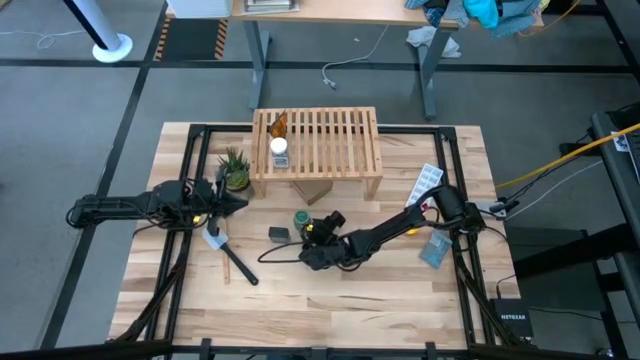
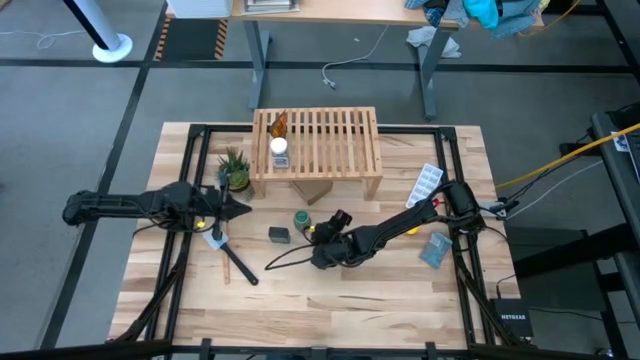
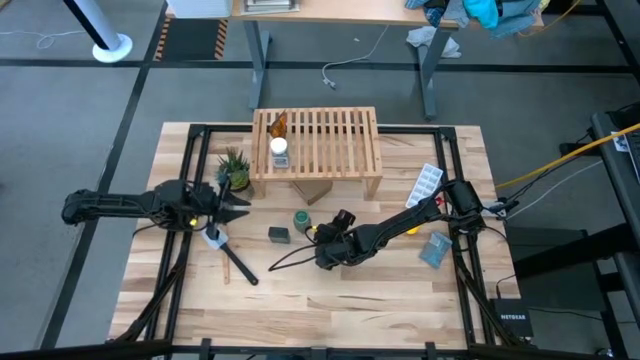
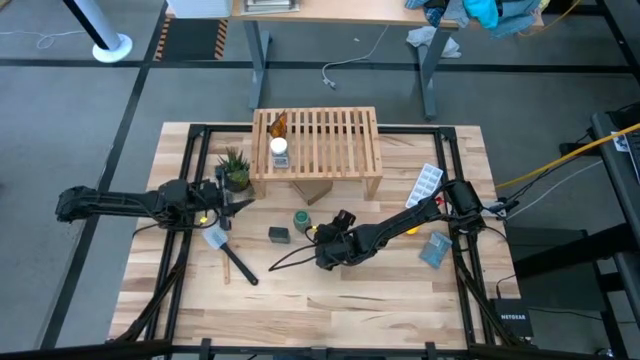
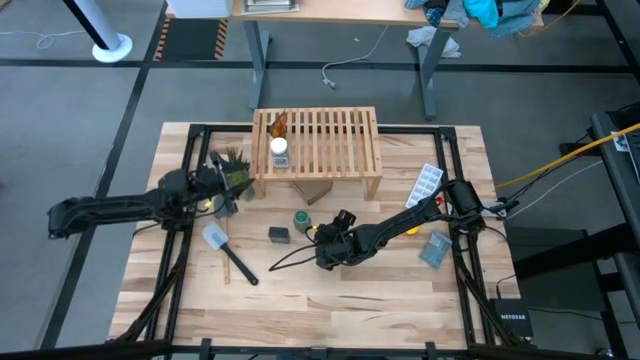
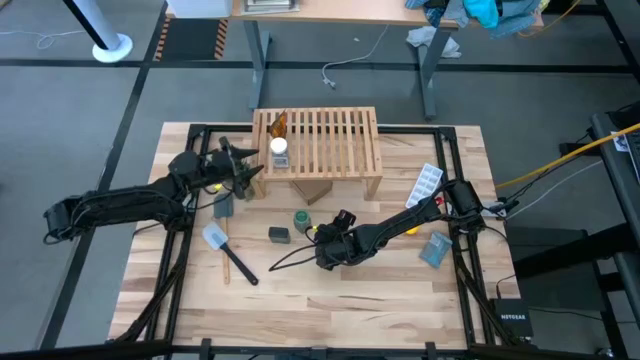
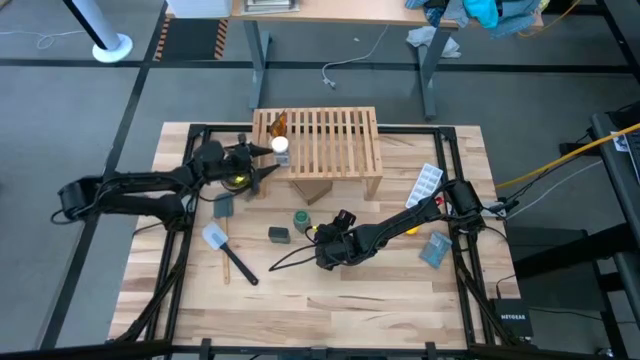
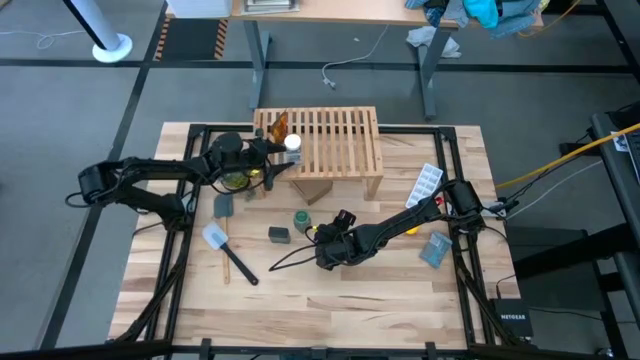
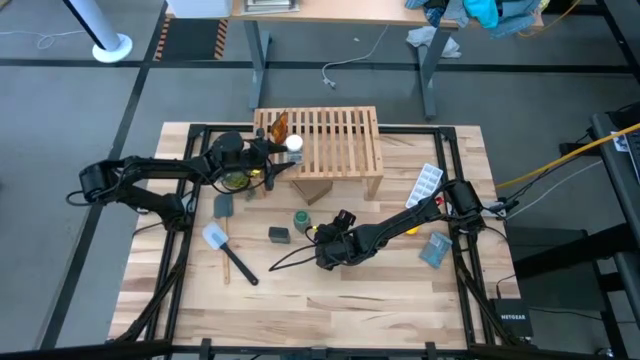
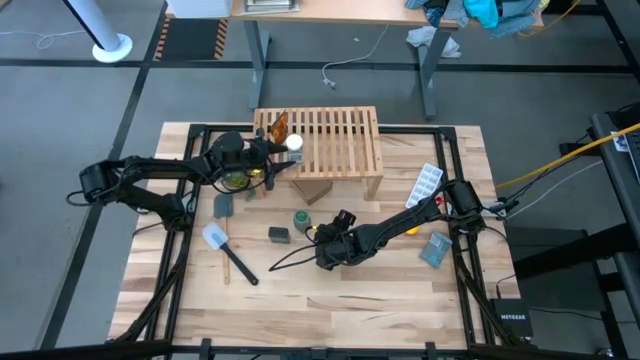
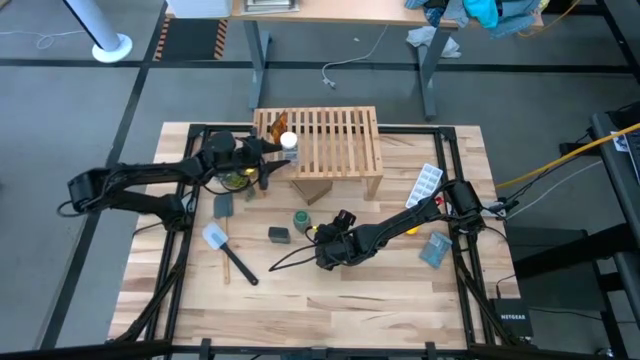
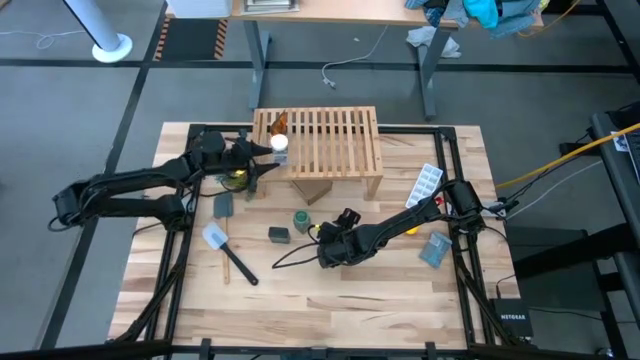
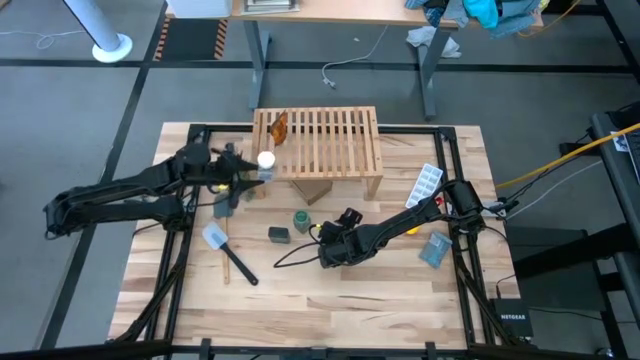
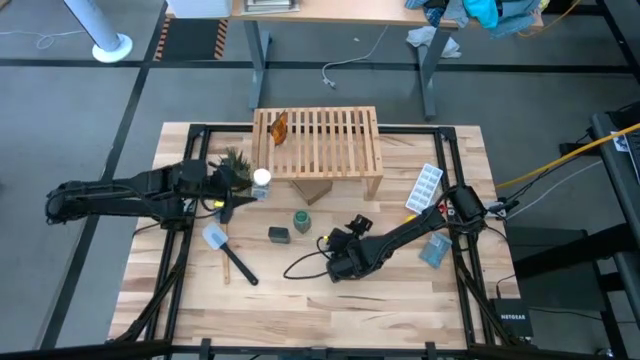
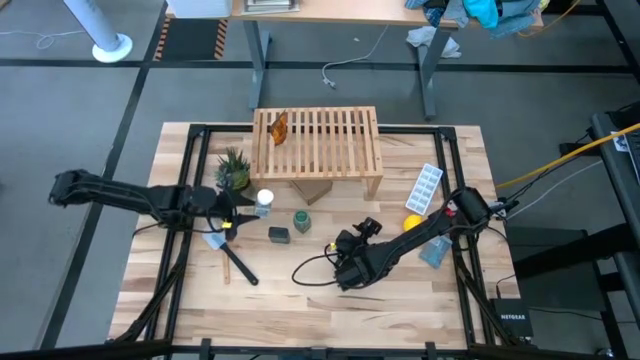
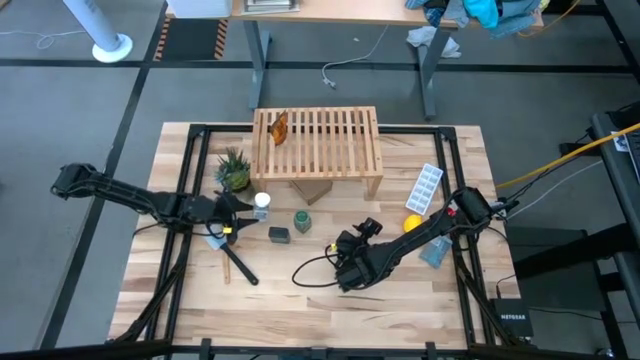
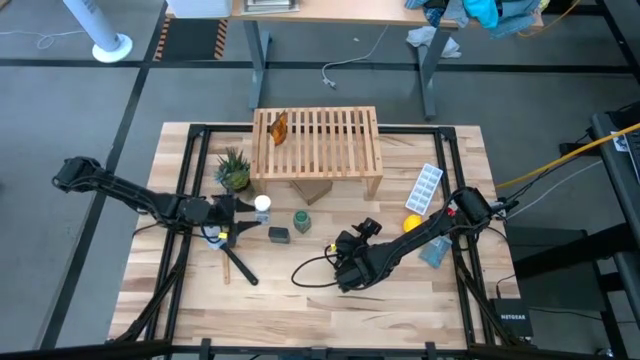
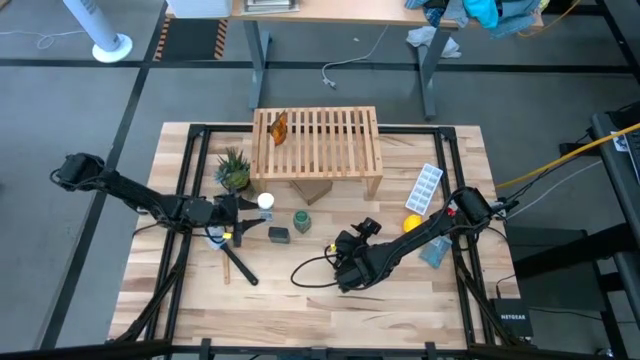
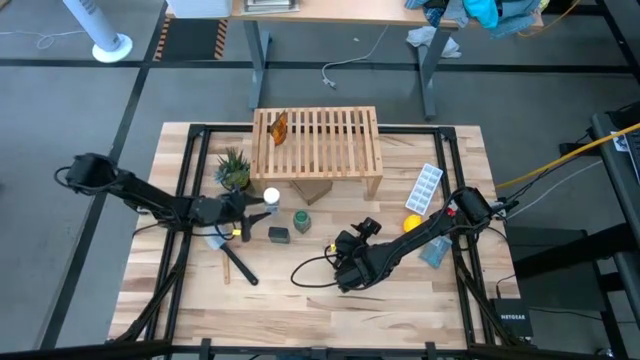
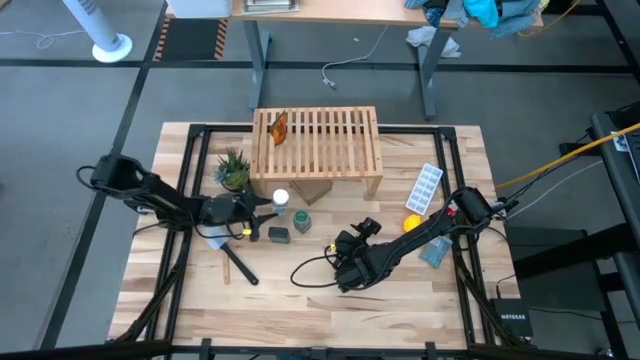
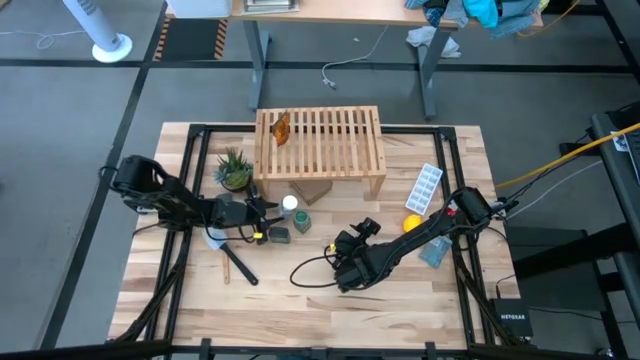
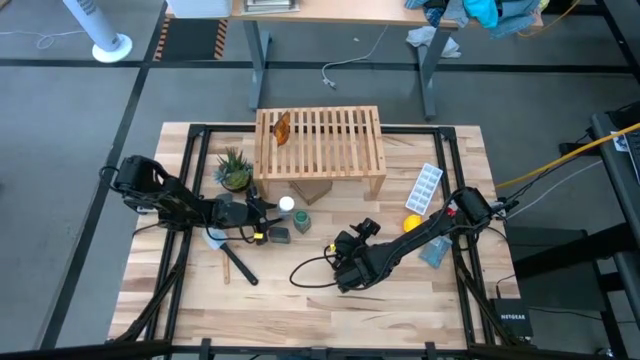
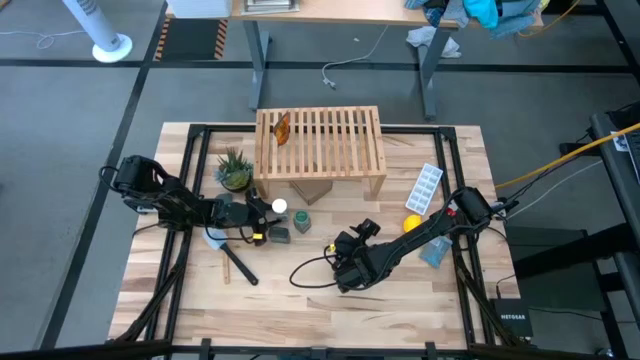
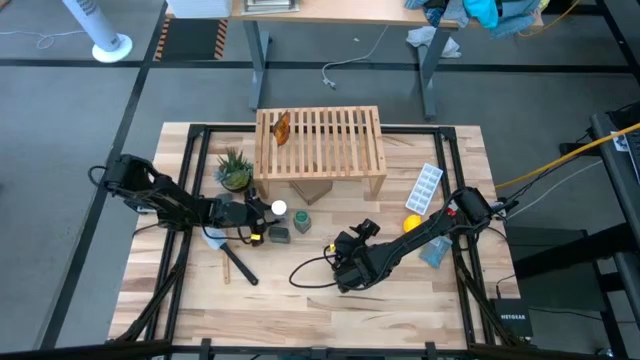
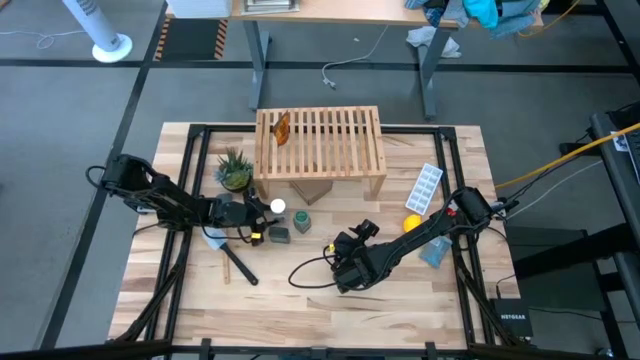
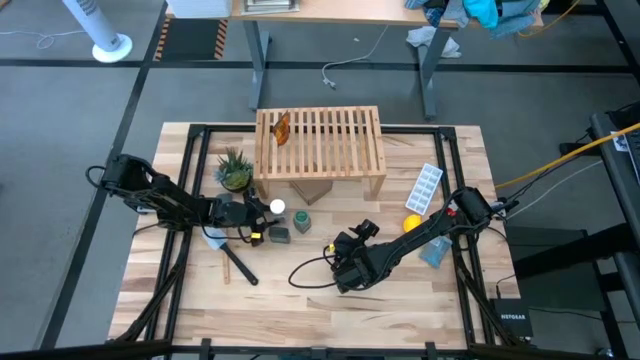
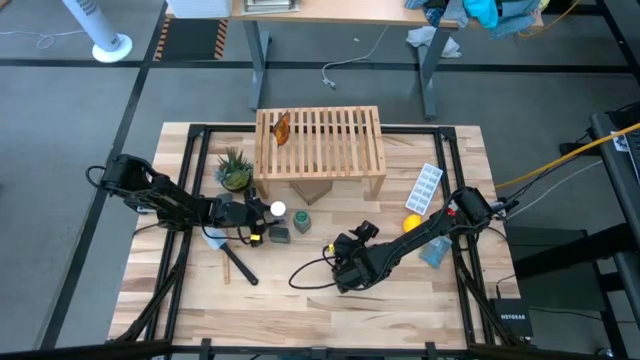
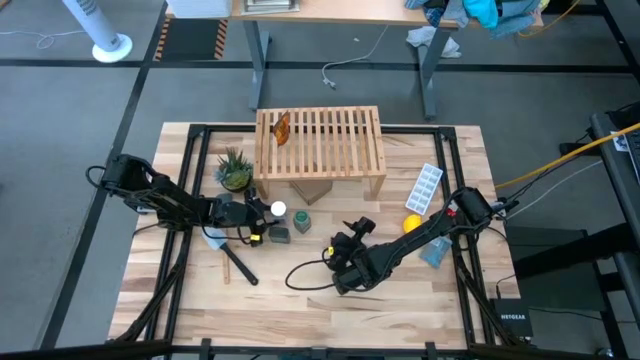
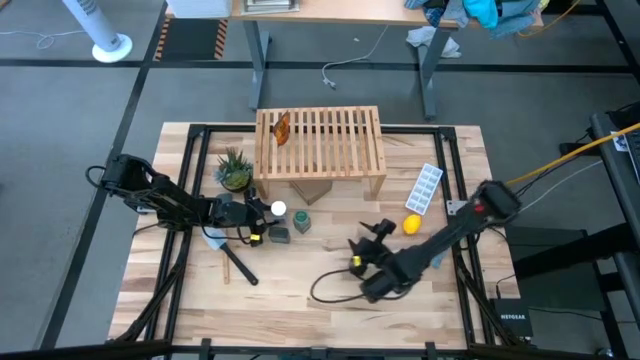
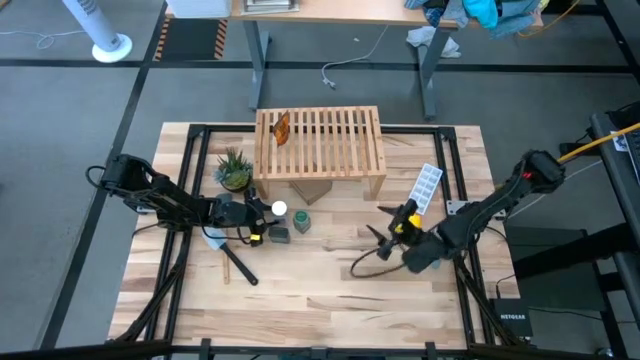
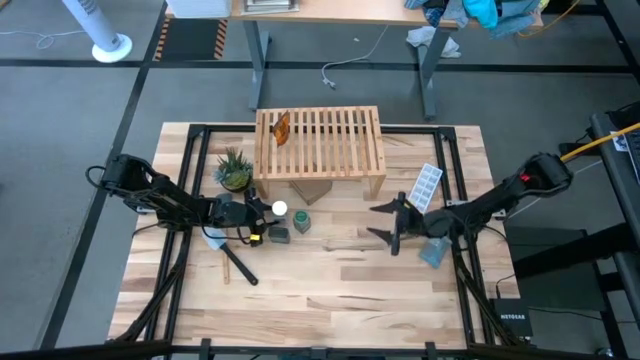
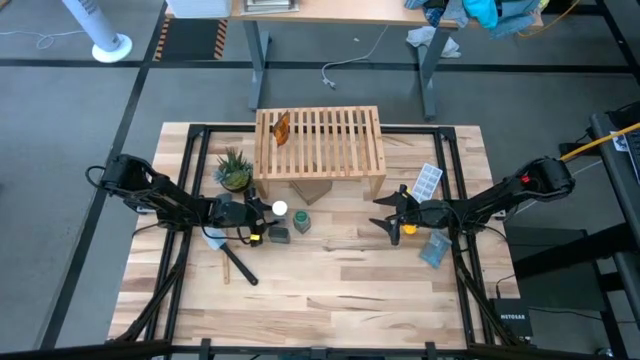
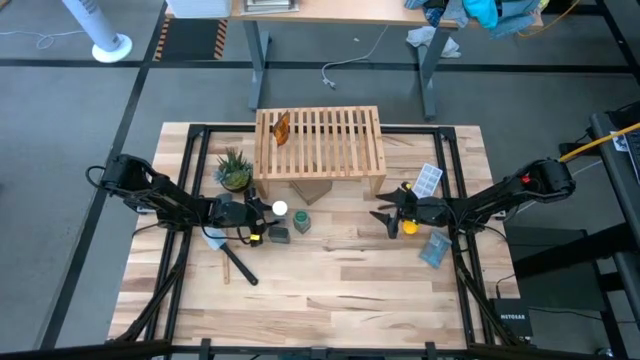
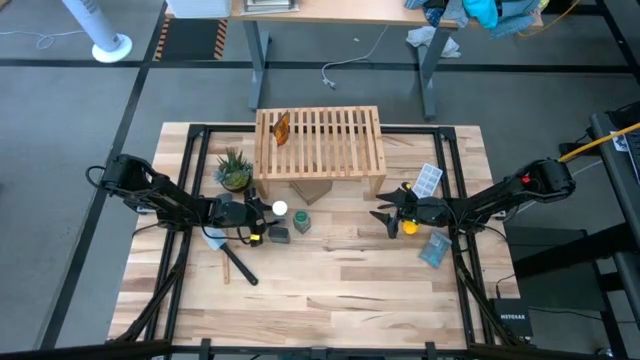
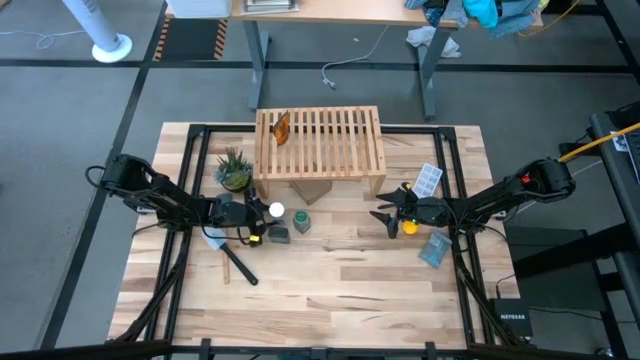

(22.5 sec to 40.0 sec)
Task: Shelf spices
Remove the white seasoning bottle from the shelf to the table

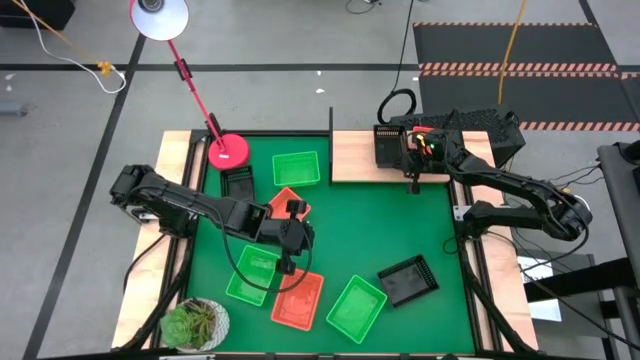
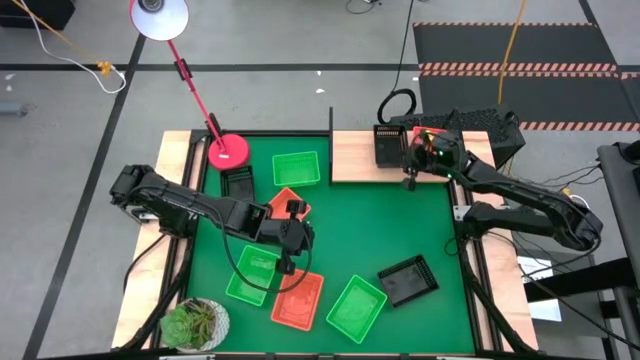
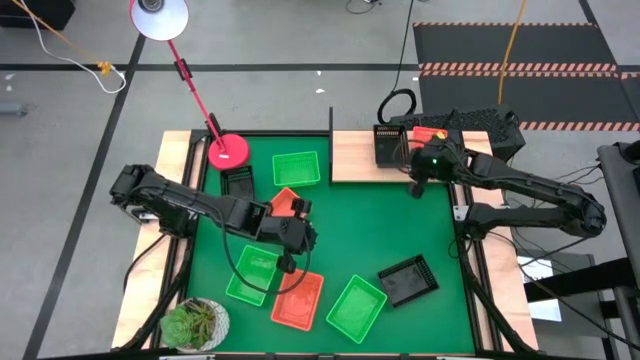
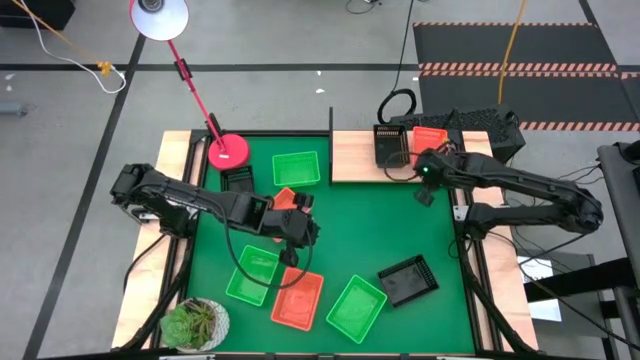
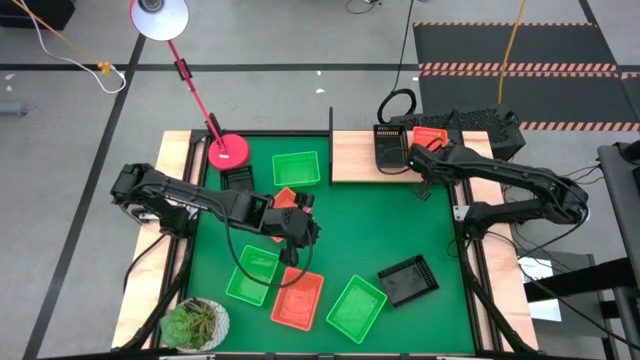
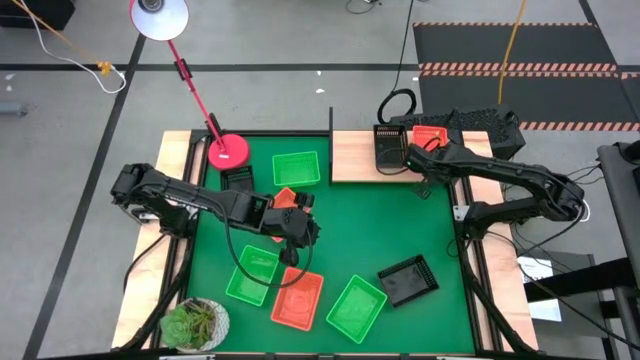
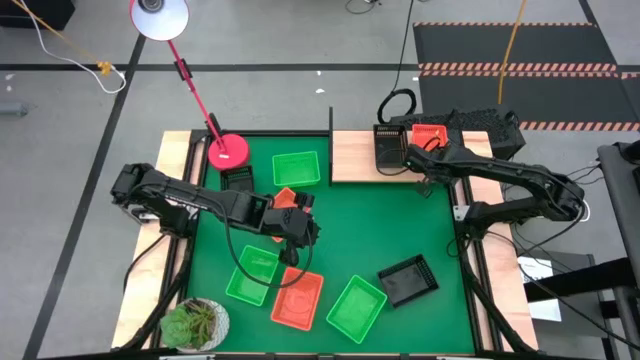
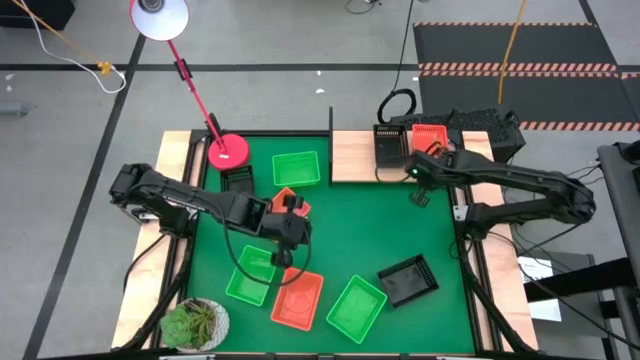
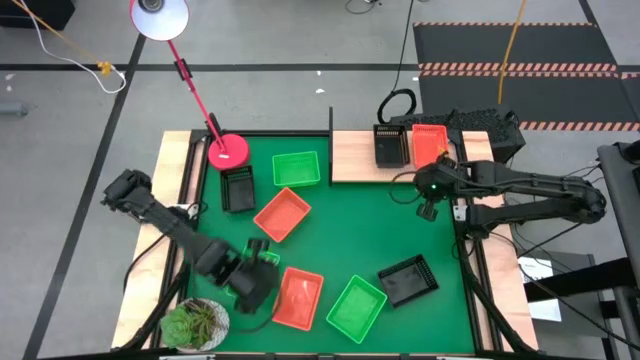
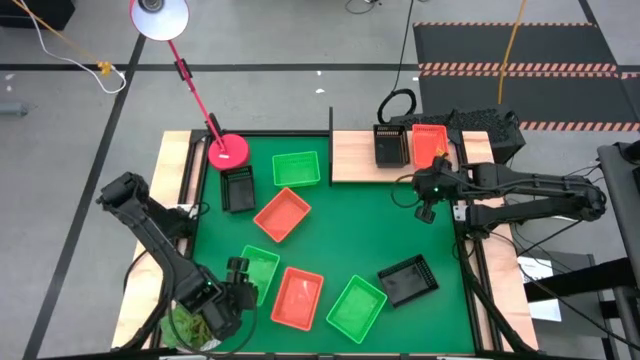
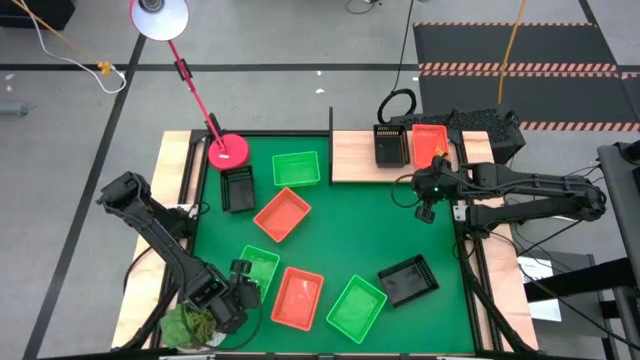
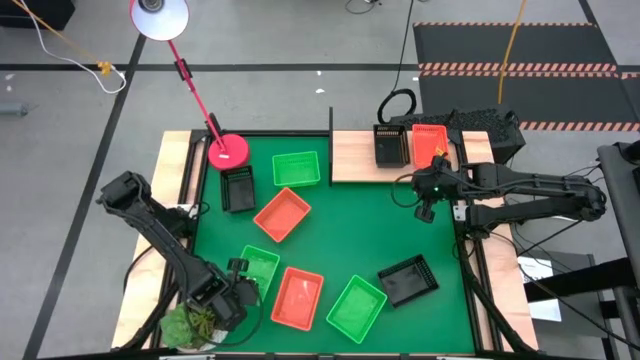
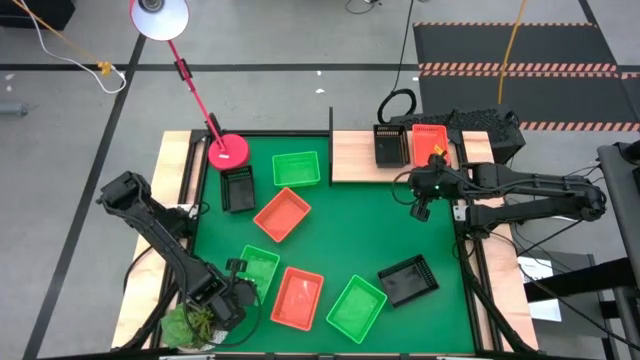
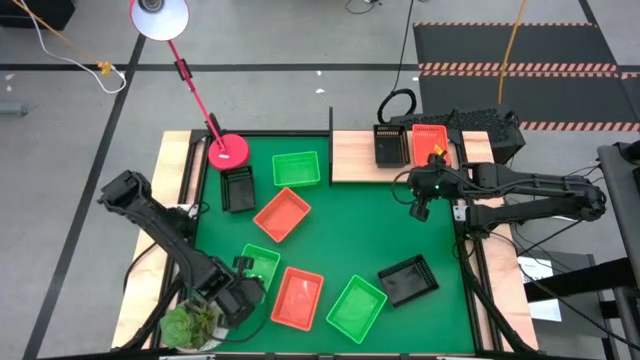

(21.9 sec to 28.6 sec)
Task: Stack baskets on shelf by color
Put the bottom left green bin on the shelf
